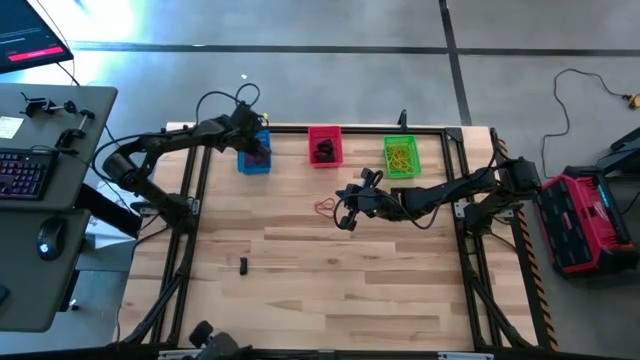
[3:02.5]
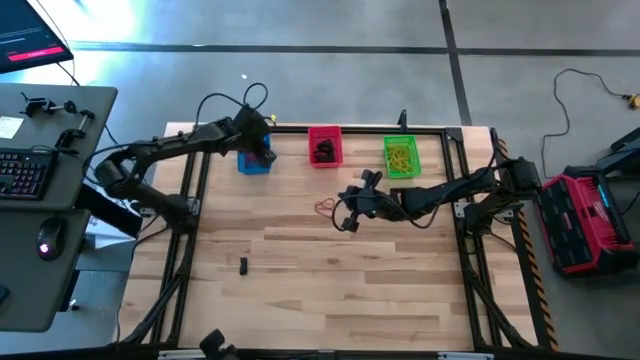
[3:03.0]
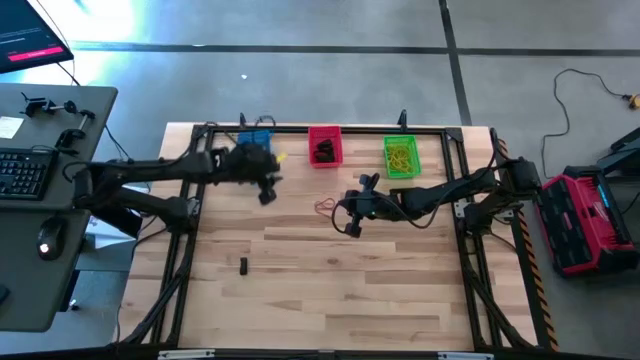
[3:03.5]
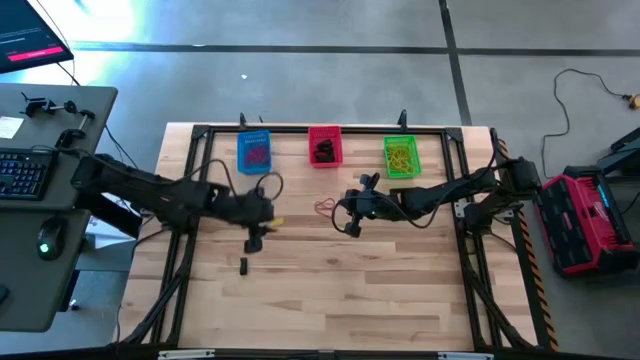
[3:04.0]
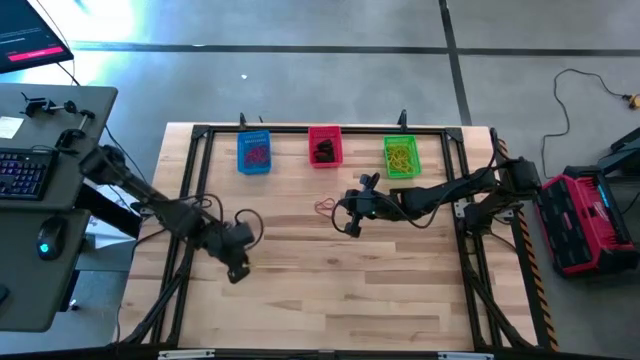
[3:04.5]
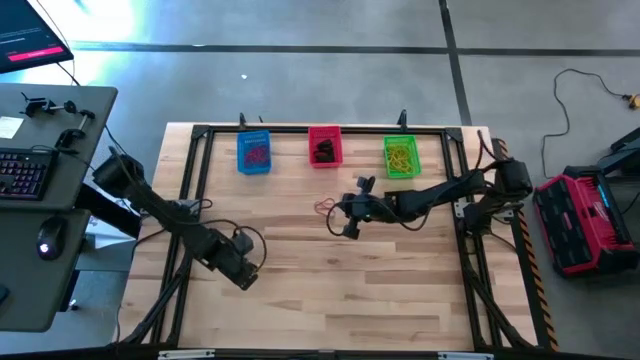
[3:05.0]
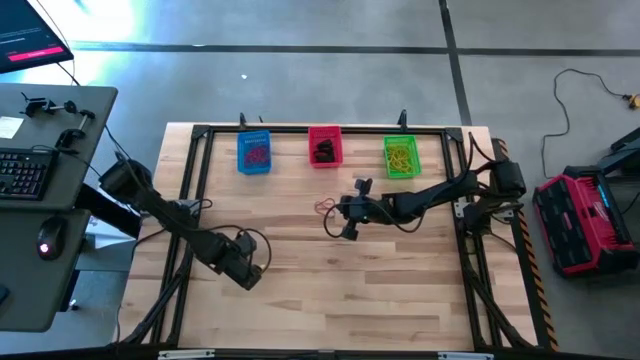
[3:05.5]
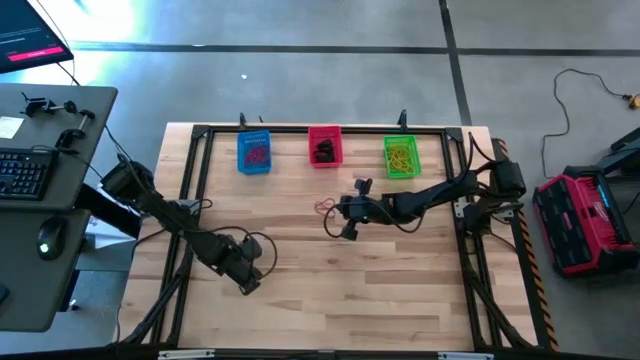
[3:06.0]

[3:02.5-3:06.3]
Task: Sort rubber bands into baskets
Put the black rubber band into the red bin

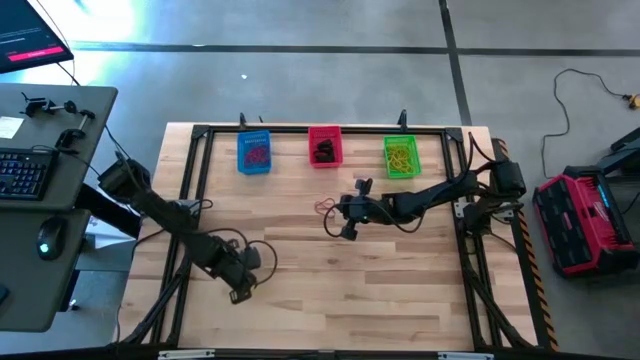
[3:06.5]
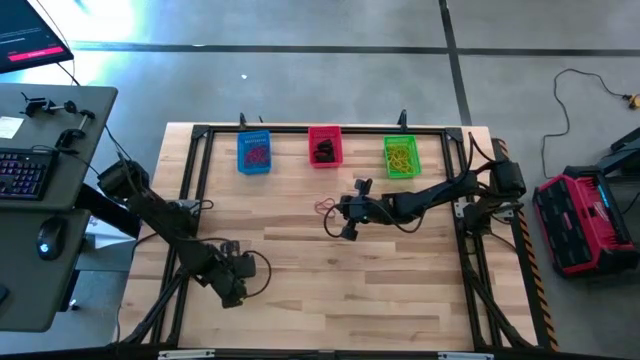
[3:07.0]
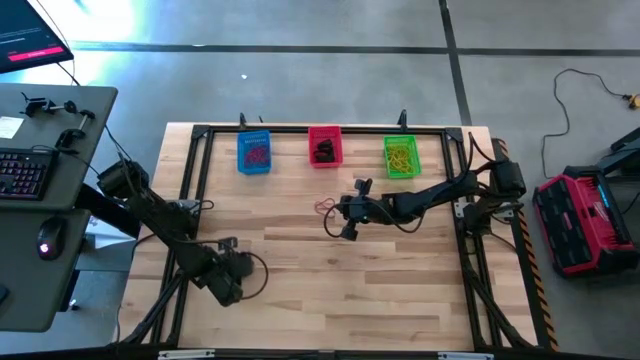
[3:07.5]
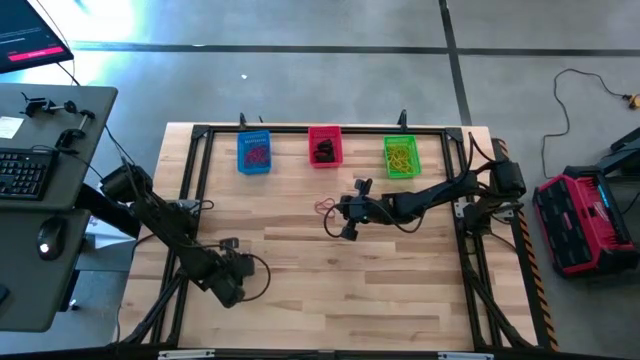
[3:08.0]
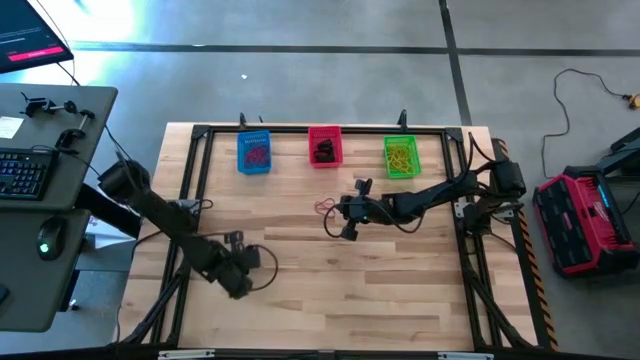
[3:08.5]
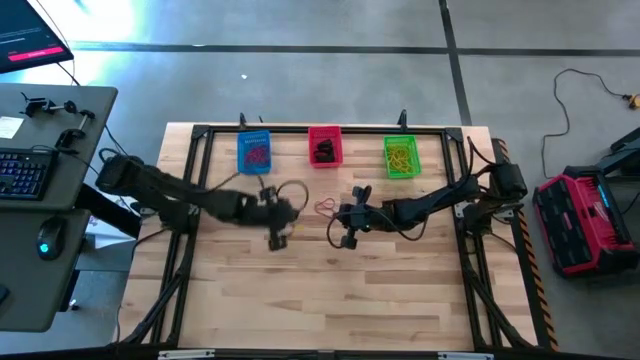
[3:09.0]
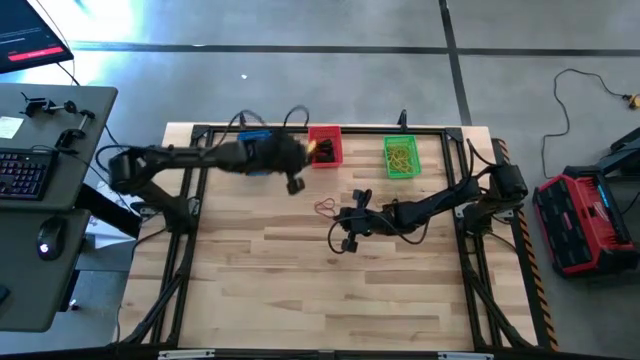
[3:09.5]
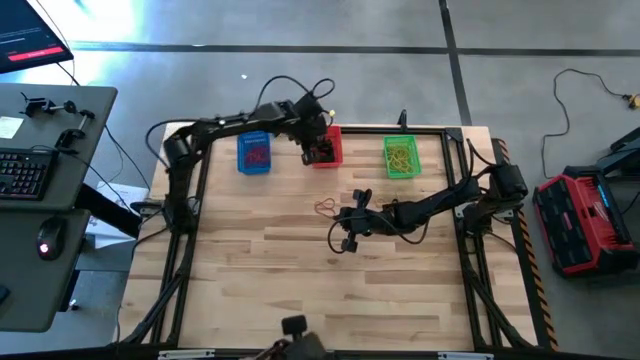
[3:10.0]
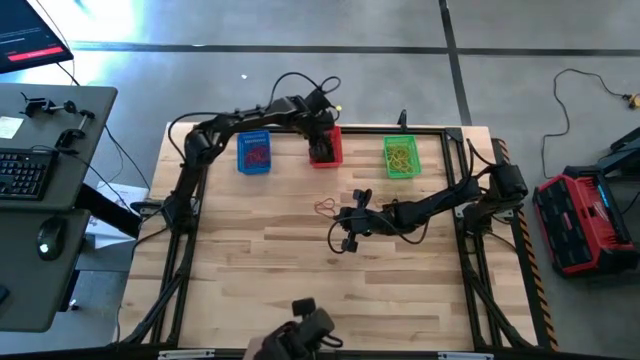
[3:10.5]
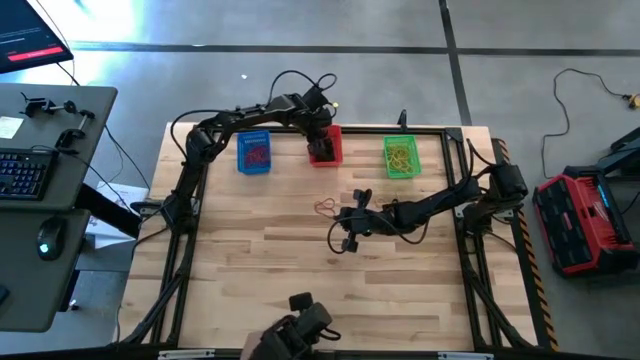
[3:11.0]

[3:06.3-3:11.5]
Put the black rubber band into the red bin

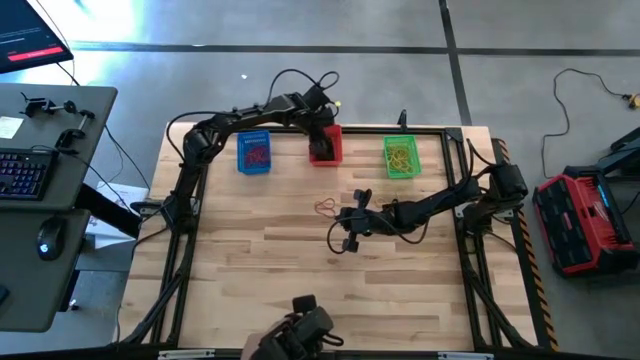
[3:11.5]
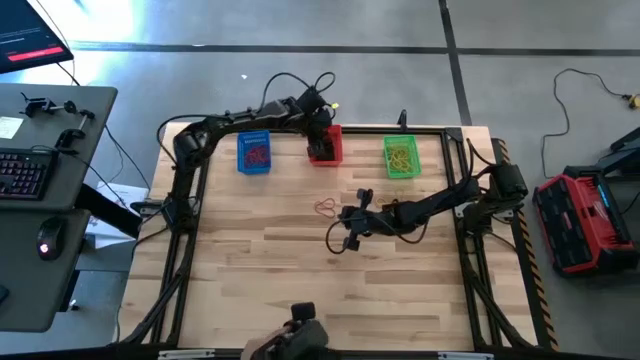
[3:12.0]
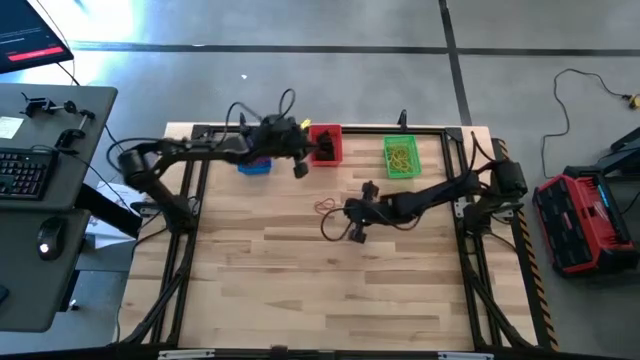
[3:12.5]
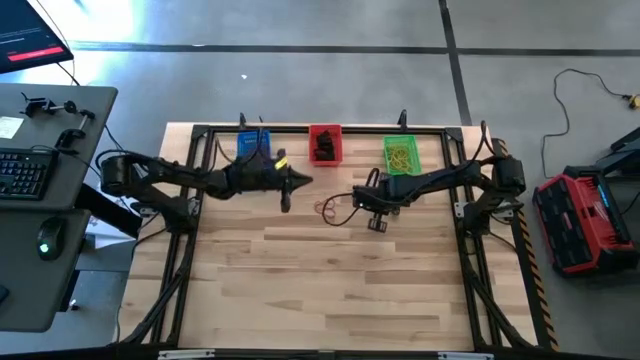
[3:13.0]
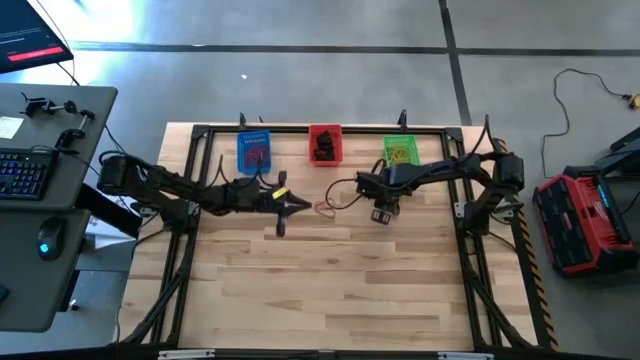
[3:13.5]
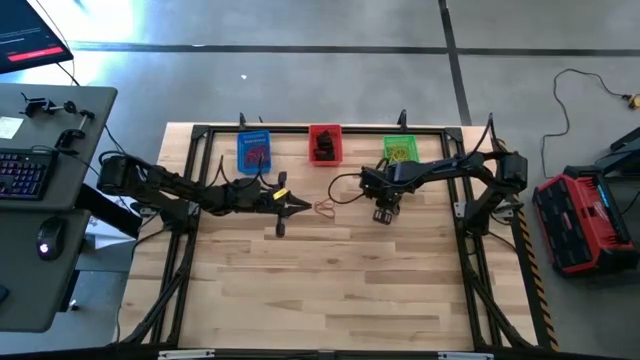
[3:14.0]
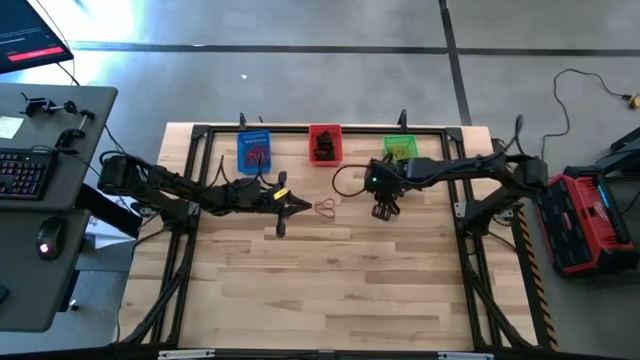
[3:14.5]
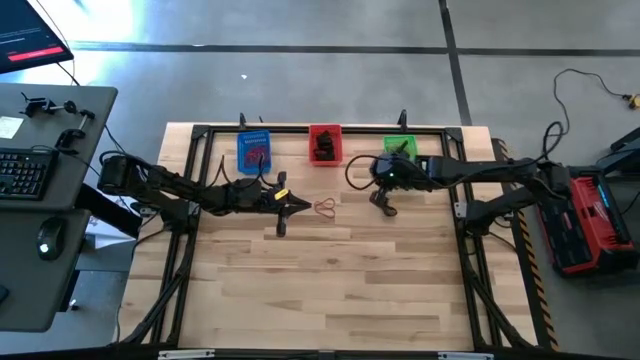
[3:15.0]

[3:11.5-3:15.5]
Put the yellow rubber band into the green bin

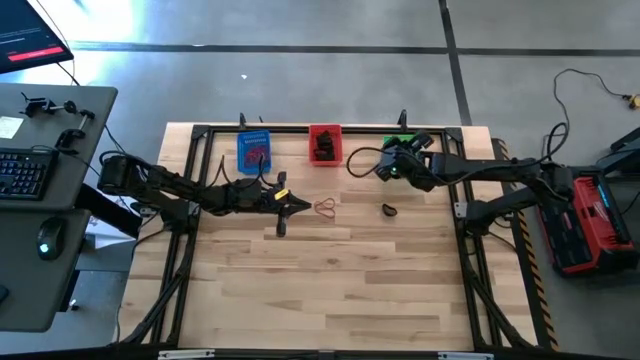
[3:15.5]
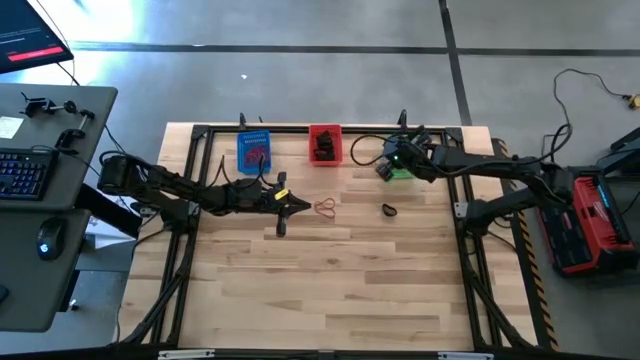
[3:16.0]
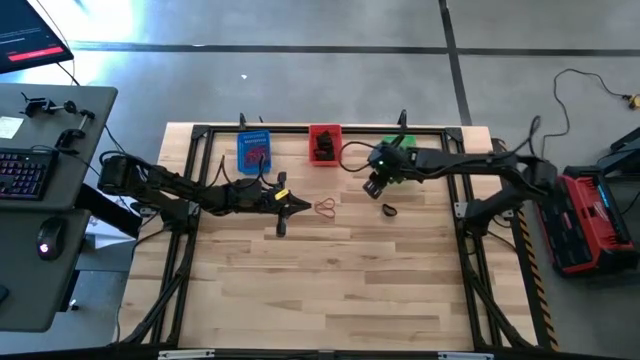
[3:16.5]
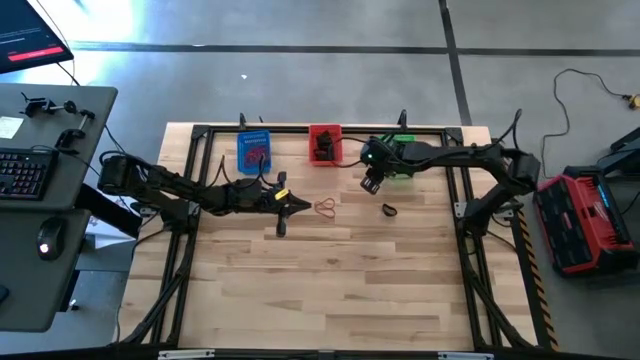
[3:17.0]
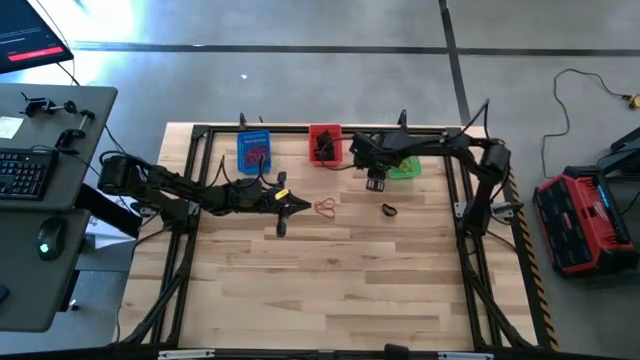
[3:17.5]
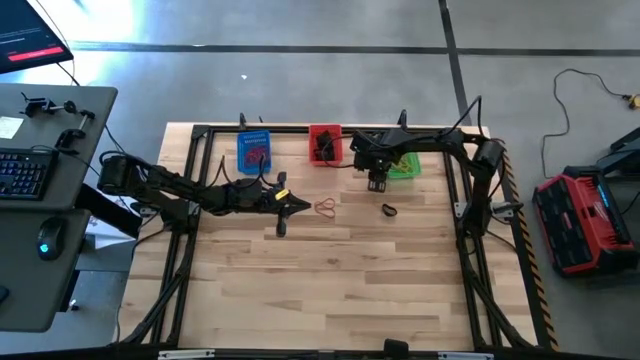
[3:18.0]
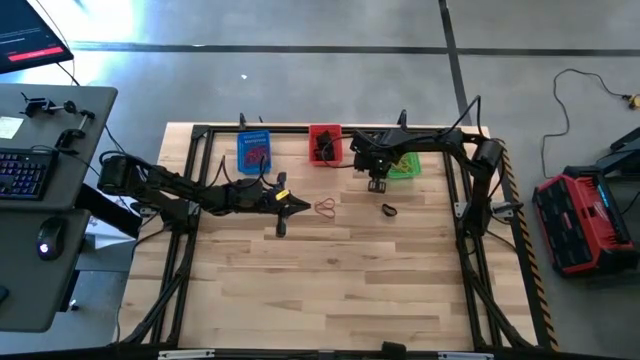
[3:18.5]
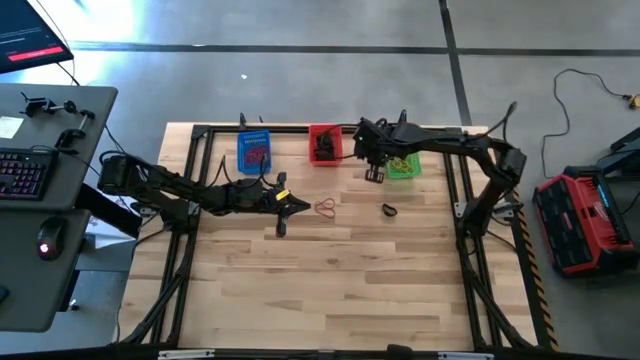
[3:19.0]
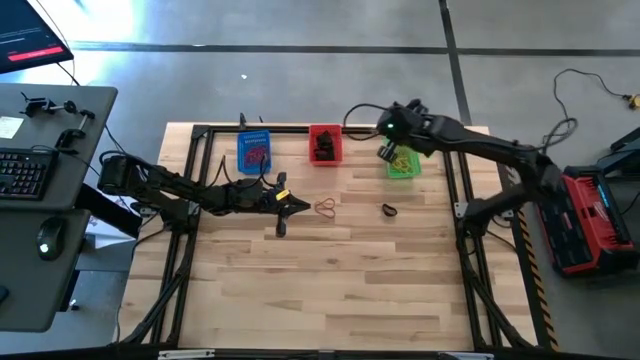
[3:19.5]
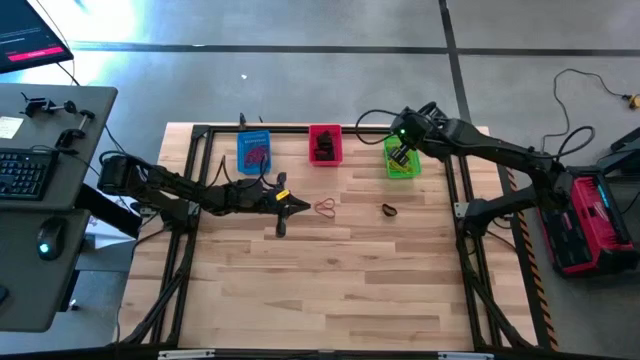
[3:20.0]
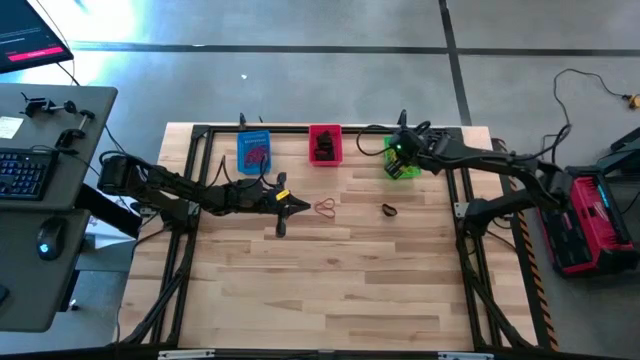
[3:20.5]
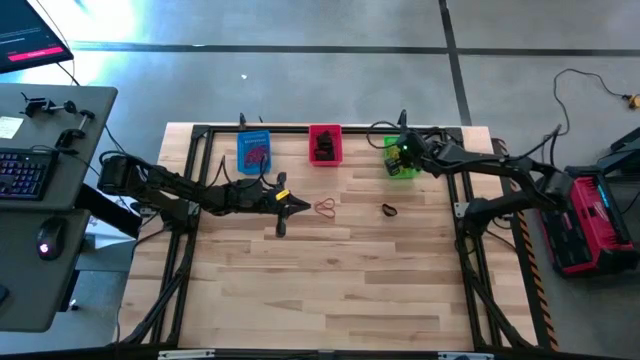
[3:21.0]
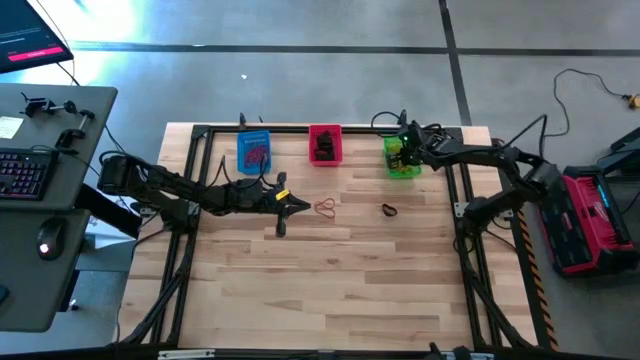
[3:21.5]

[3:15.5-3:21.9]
Put the yellow rubber band into the green bin
